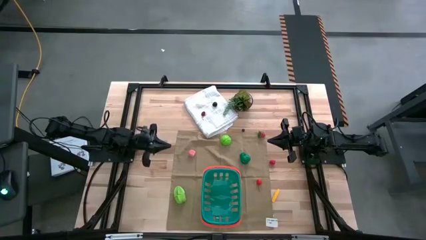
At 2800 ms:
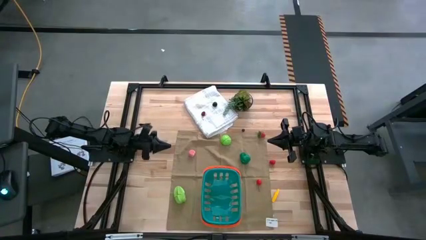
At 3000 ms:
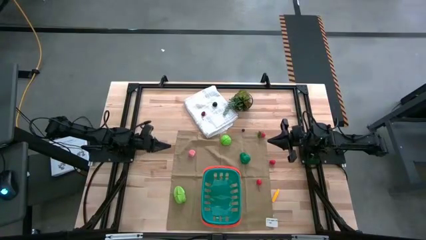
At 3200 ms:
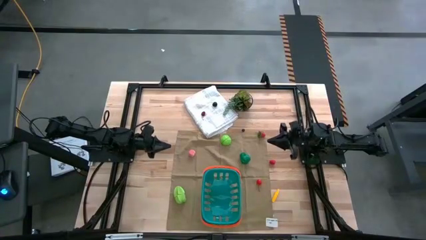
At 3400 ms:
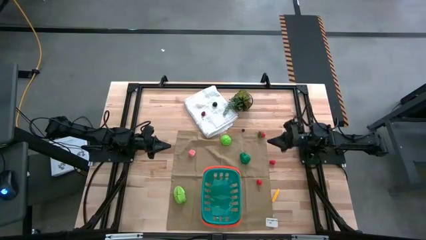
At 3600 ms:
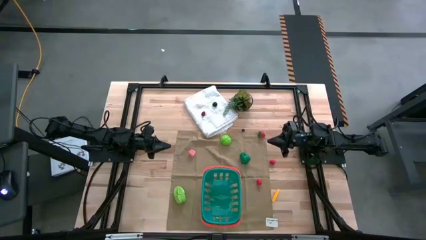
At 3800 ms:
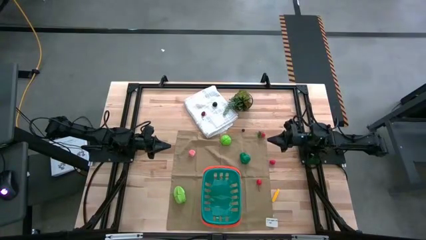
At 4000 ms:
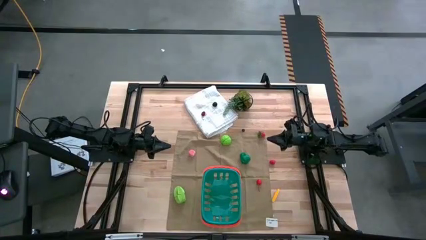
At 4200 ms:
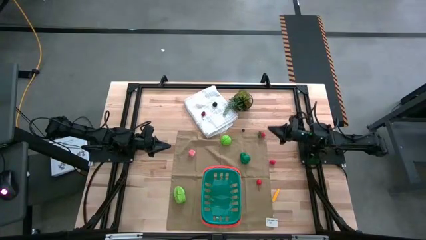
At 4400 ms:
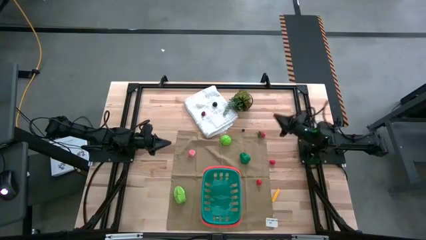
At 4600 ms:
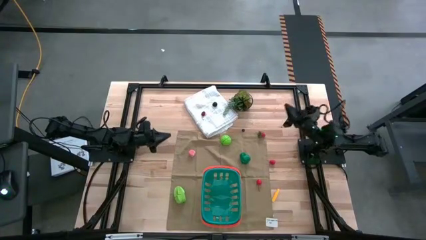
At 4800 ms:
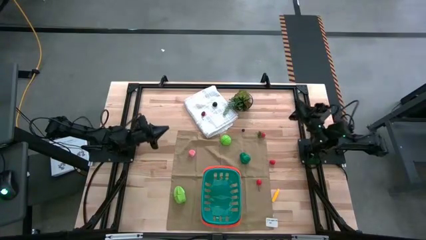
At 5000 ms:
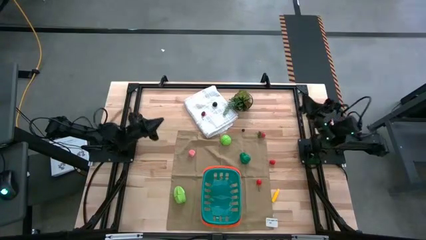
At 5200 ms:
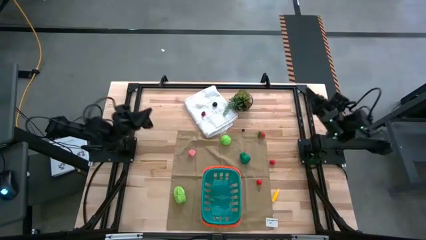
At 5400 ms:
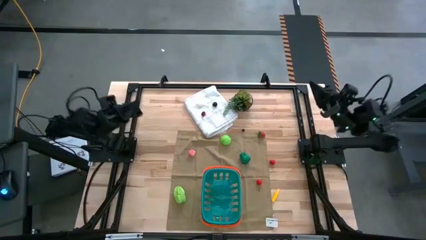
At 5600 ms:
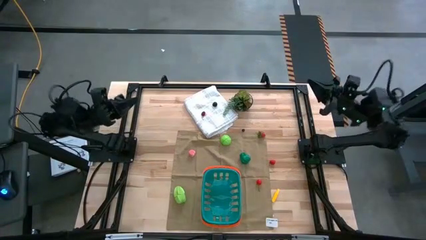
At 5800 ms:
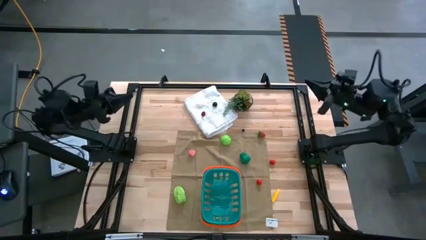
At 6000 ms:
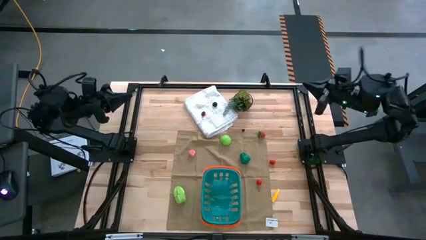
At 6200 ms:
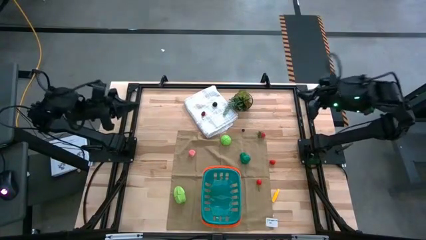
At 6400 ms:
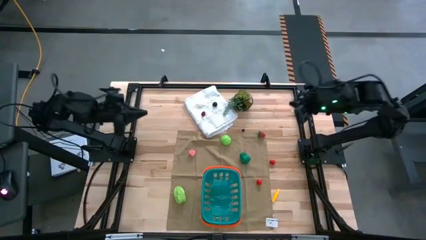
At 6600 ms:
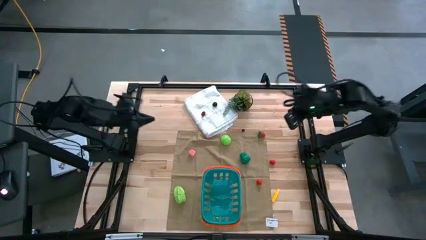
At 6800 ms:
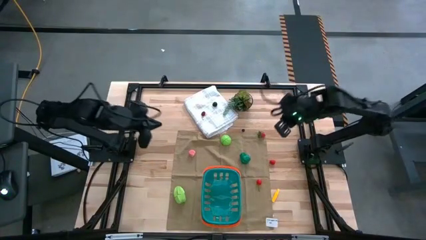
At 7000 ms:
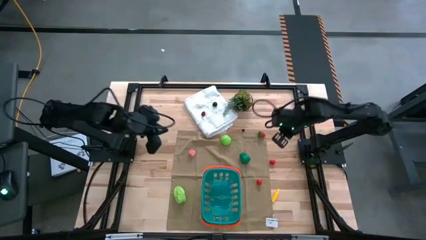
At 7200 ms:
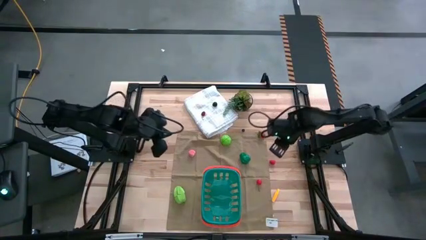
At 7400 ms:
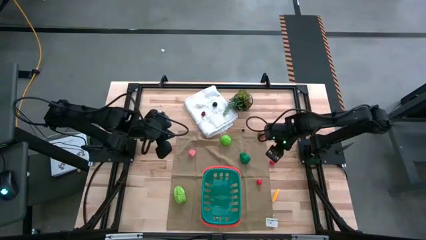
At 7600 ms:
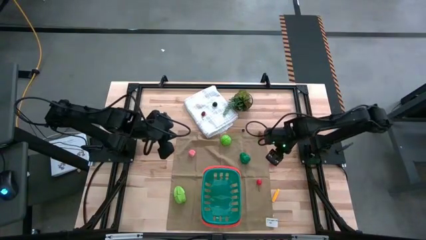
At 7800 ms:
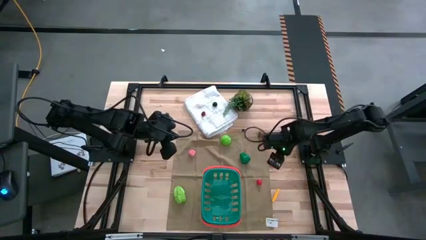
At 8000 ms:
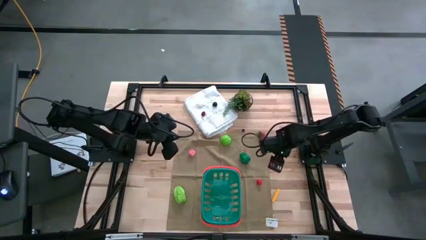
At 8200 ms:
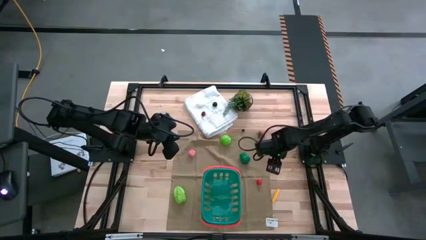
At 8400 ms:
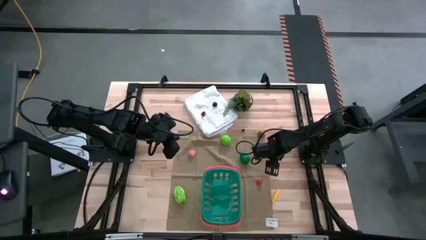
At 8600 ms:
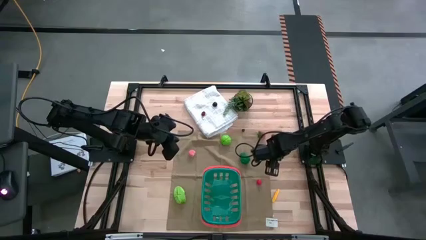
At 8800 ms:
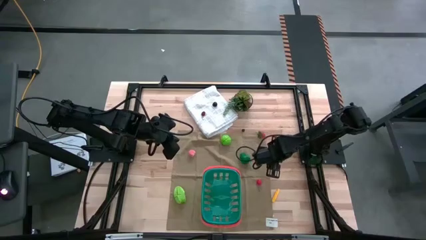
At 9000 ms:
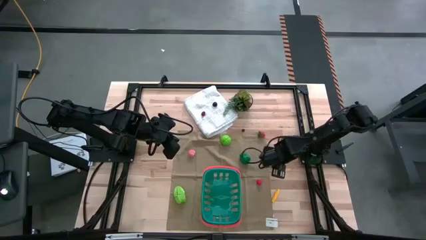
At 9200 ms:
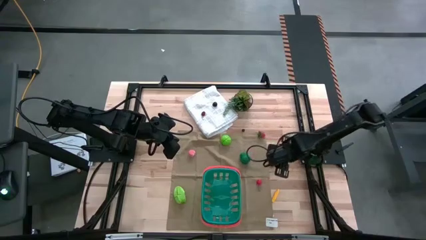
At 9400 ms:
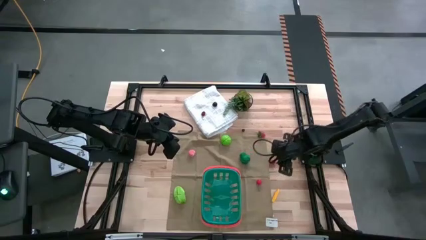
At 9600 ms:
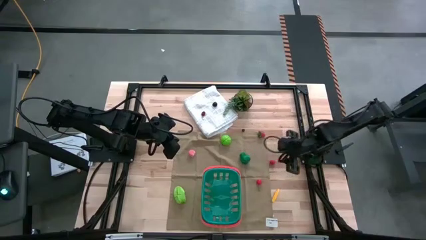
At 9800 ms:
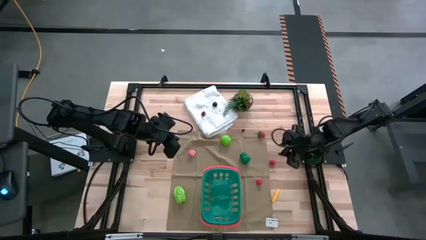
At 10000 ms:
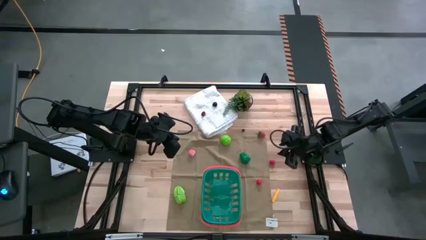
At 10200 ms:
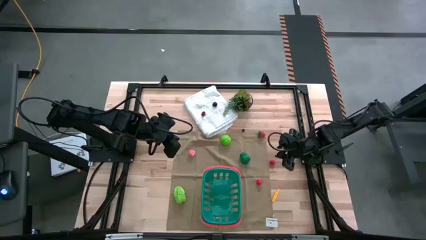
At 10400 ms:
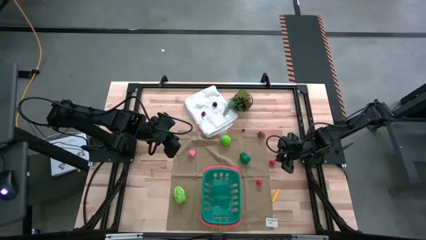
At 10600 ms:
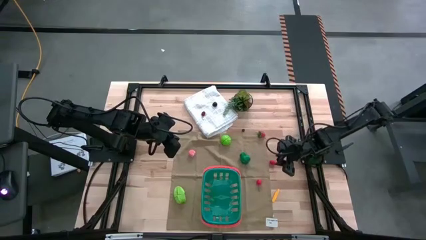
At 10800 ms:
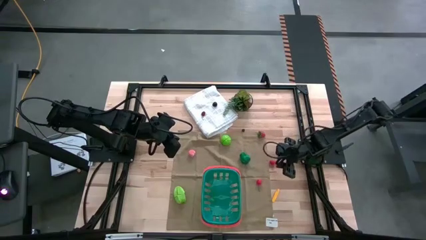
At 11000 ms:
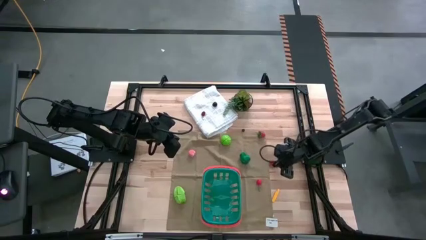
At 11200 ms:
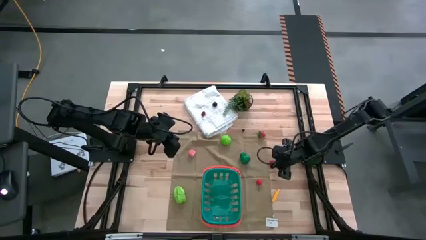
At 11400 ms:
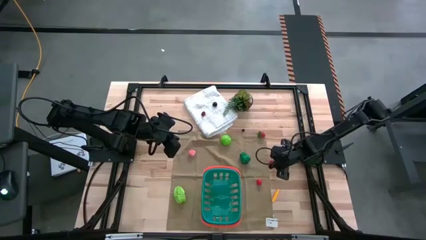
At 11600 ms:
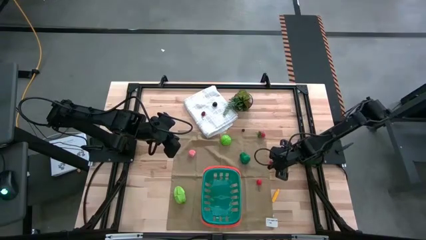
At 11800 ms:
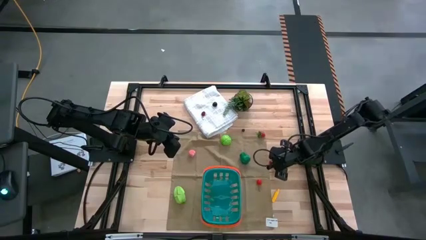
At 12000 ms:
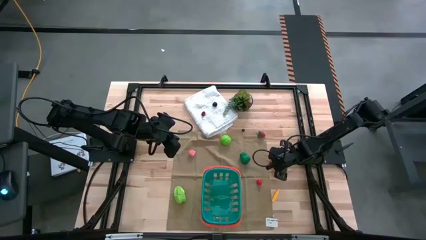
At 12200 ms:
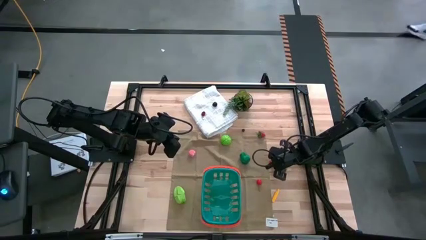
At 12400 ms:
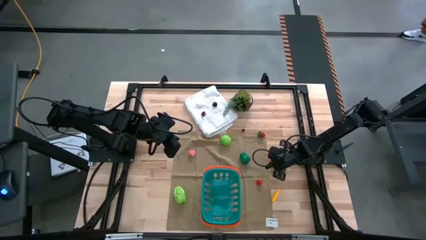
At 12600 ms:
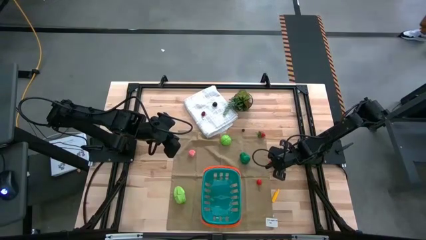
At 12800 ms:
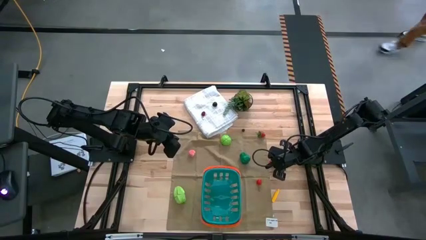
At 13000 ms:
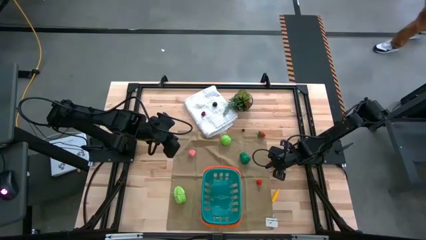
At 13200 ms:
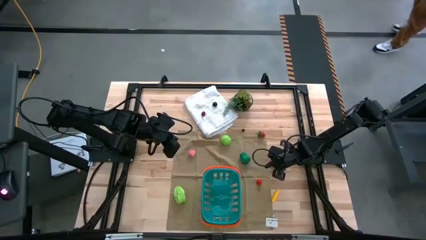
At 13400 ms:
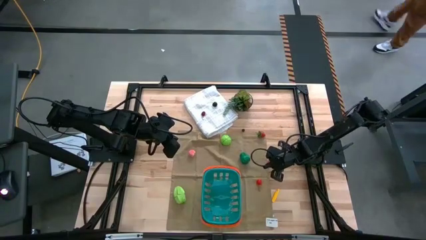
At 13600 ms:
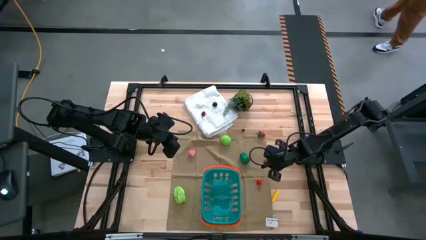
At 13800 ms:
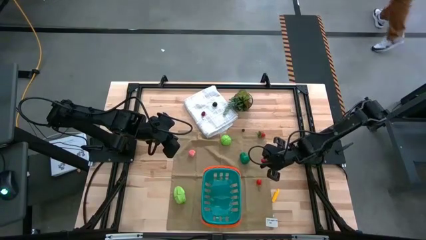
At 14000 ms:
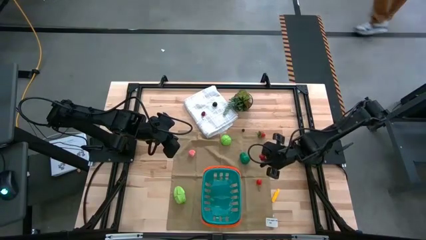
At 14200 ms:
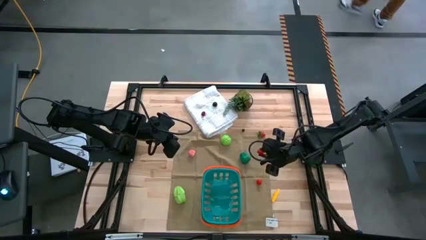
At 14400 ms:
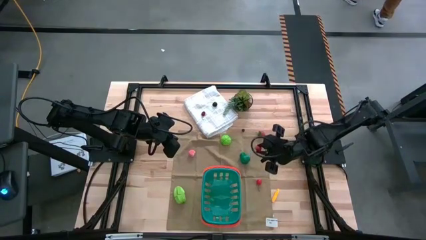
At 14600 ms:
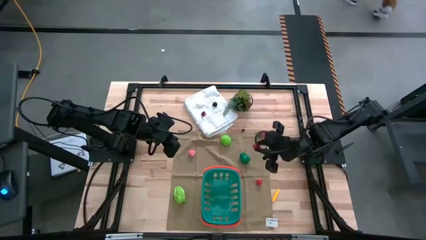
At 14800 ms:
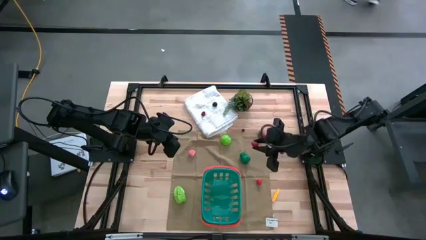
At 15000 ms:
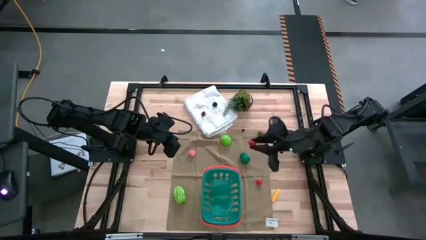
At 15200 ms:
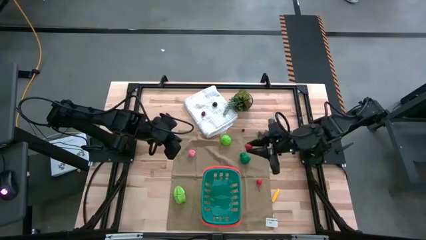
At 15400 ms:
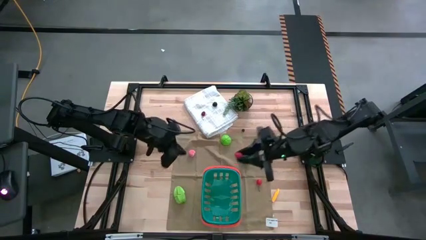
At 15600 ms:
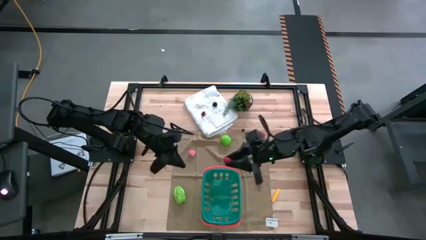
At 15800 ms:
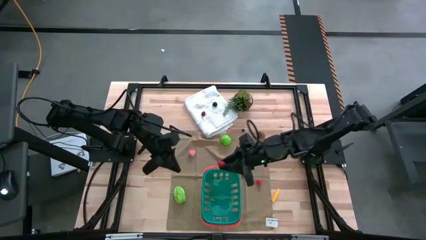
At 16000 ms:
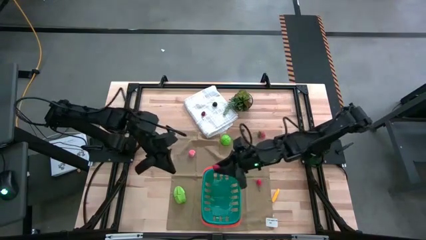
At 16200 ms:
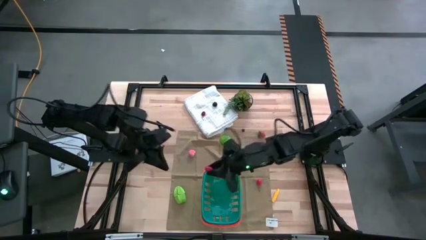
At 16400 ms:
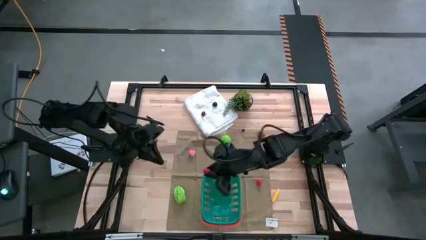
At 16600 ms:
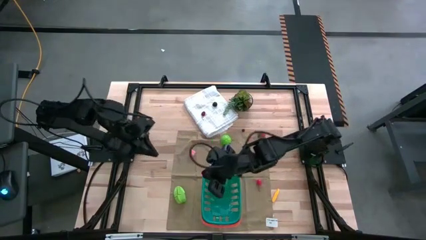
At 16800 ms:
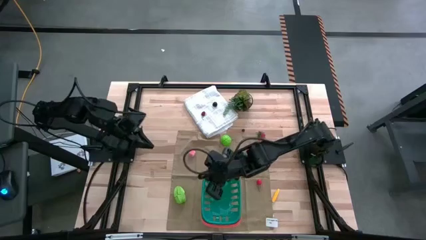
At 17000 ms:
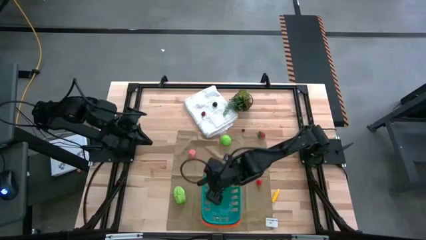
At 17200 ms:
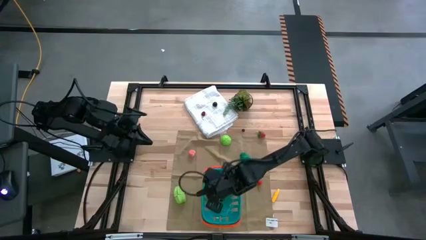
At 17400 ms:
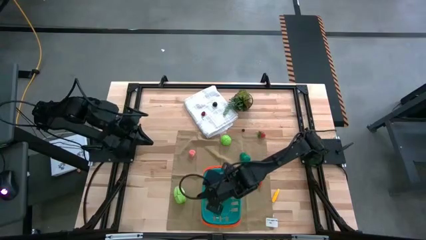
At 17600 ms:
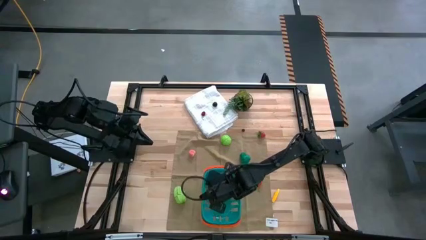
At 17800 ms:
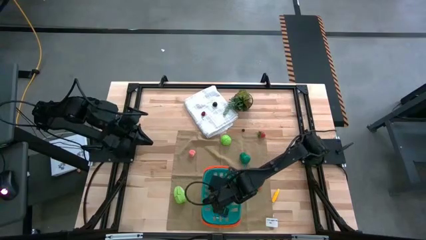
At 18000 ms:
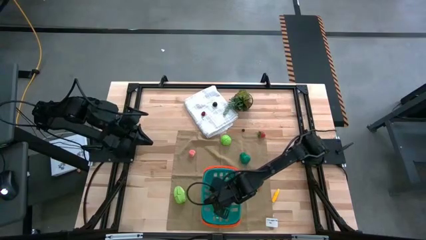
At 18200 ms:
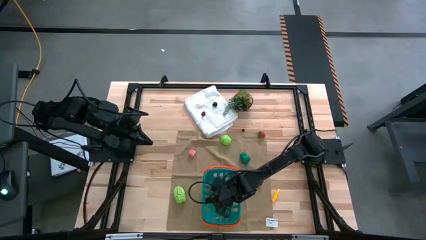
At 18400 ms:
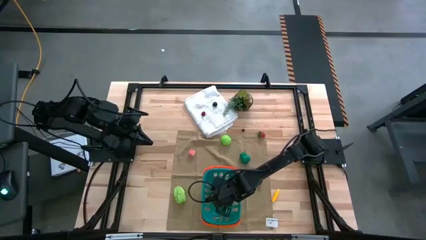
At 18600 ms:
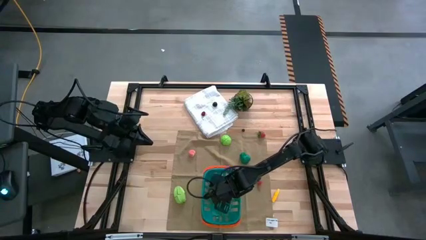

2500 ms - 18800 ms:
Task: Pick and placing Produce into tupperware
Put the red raspberry into the blue bin
